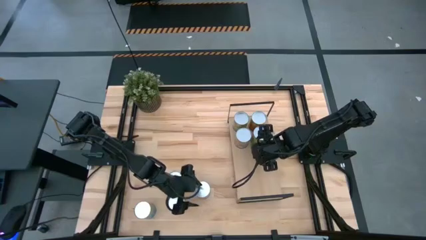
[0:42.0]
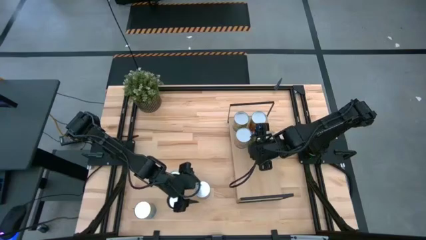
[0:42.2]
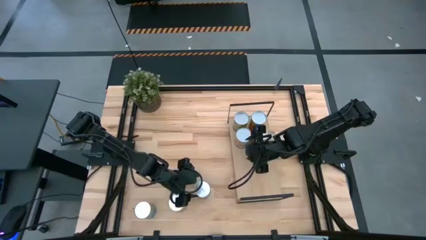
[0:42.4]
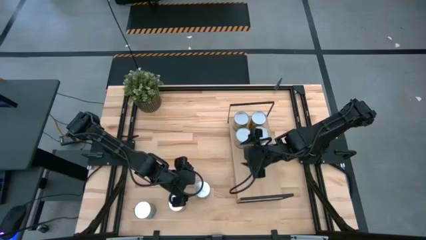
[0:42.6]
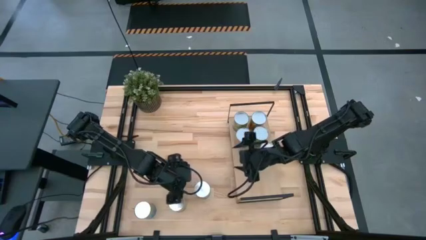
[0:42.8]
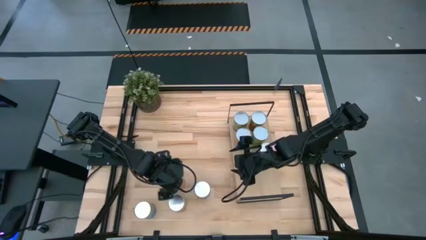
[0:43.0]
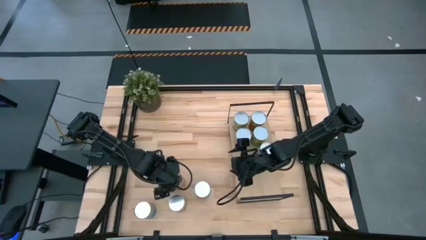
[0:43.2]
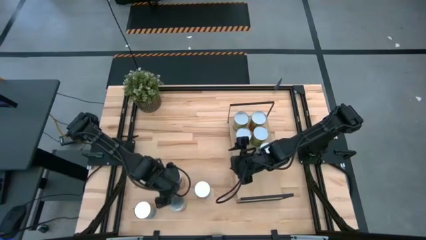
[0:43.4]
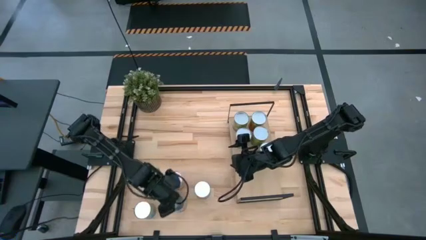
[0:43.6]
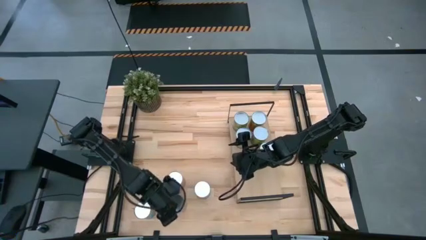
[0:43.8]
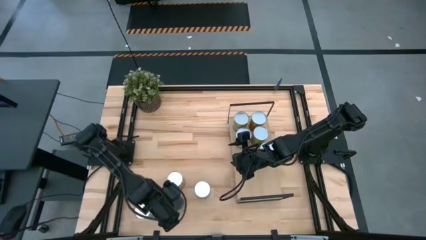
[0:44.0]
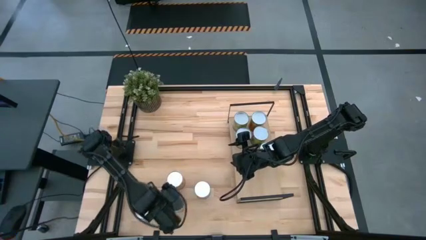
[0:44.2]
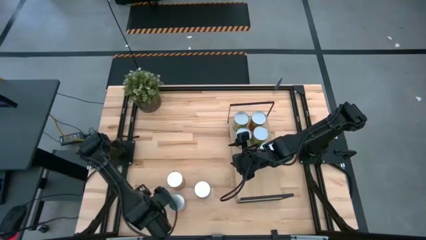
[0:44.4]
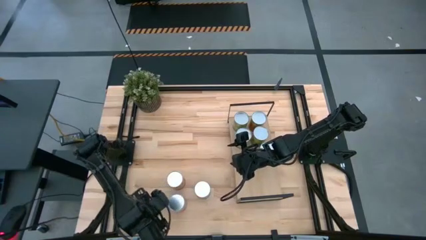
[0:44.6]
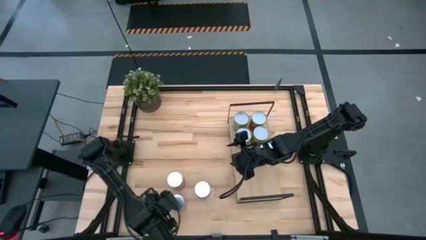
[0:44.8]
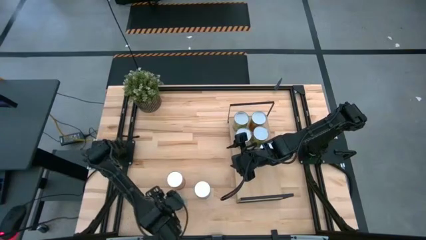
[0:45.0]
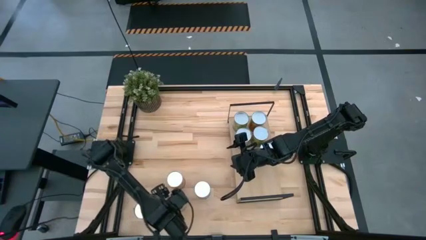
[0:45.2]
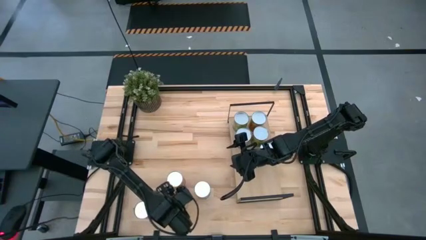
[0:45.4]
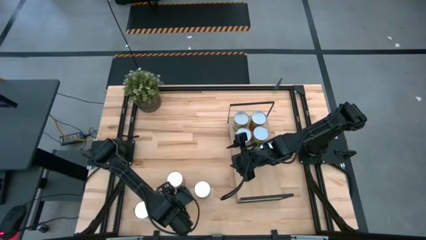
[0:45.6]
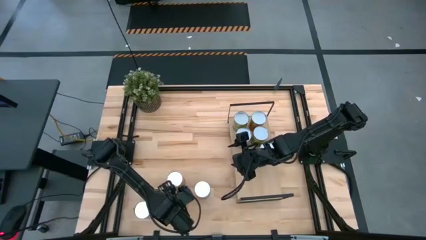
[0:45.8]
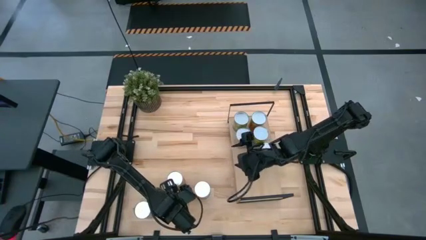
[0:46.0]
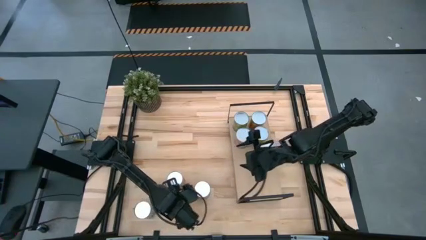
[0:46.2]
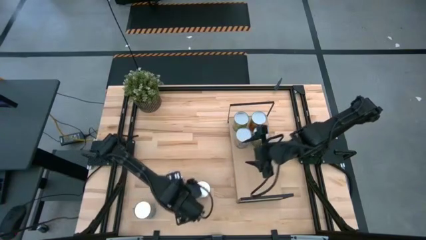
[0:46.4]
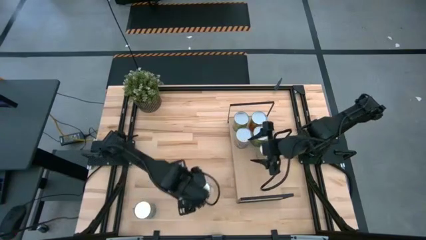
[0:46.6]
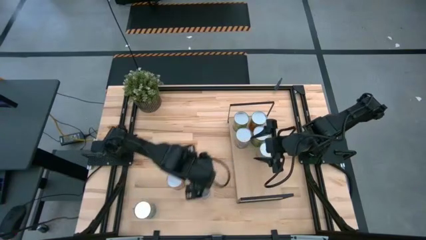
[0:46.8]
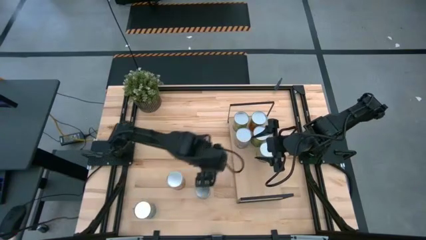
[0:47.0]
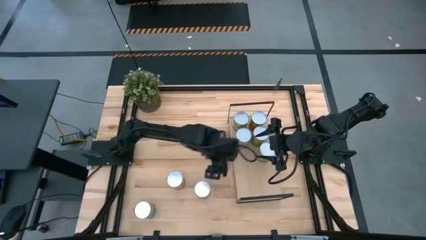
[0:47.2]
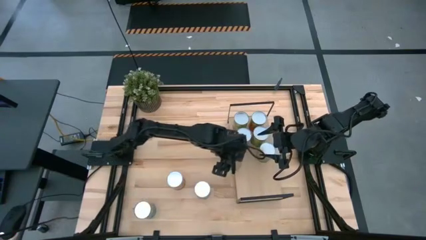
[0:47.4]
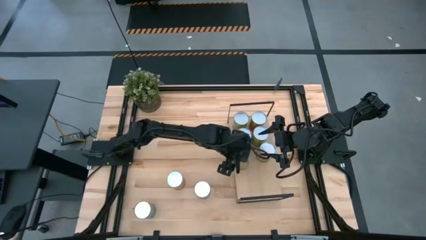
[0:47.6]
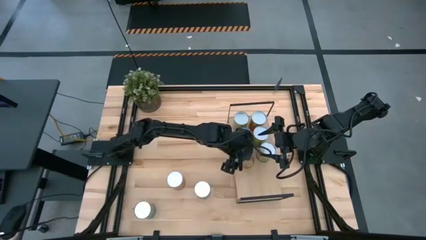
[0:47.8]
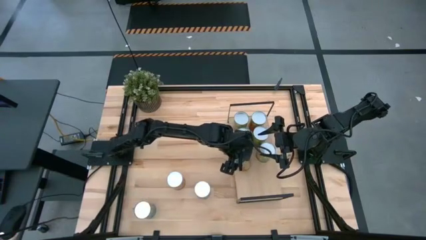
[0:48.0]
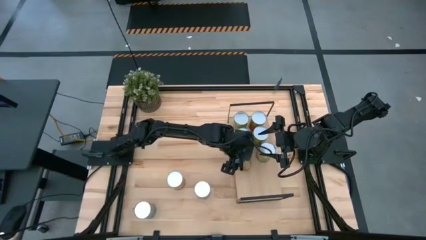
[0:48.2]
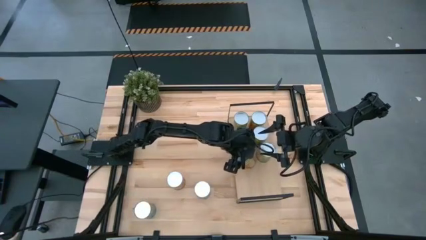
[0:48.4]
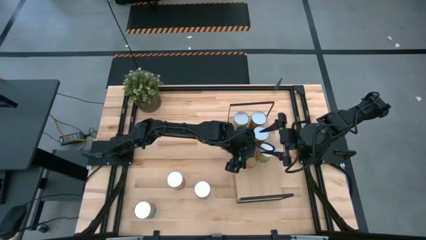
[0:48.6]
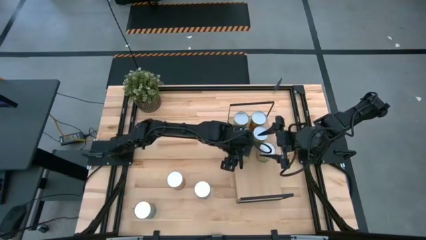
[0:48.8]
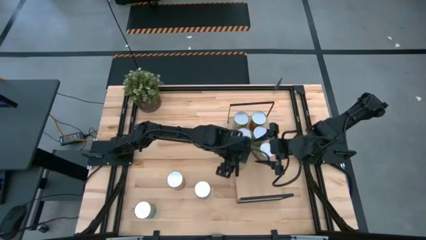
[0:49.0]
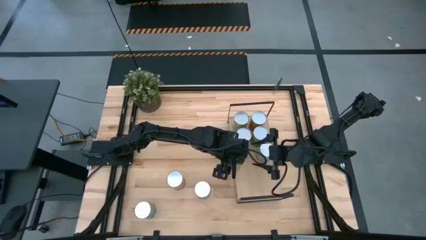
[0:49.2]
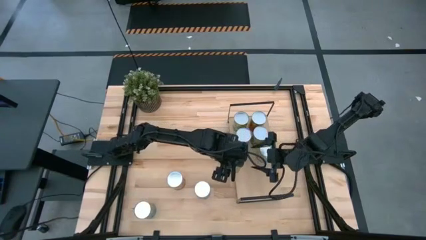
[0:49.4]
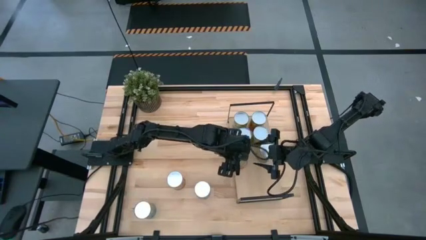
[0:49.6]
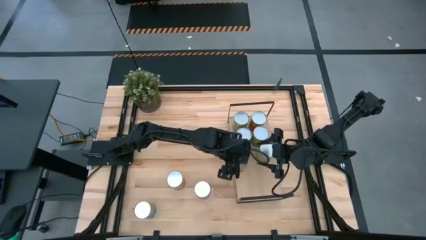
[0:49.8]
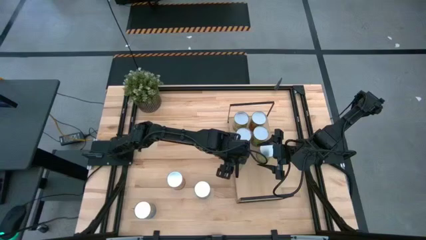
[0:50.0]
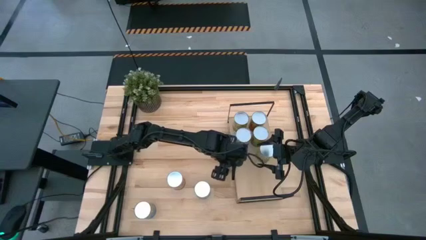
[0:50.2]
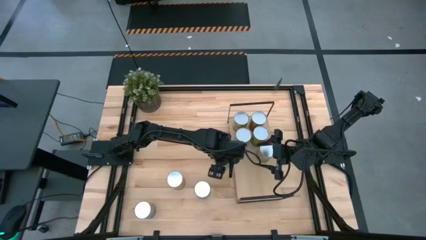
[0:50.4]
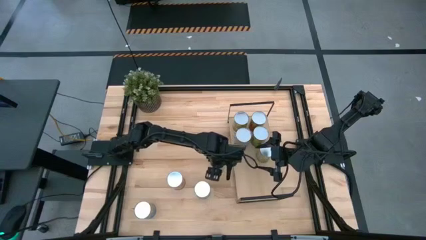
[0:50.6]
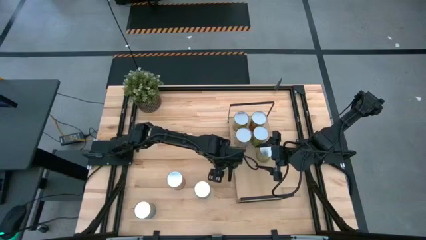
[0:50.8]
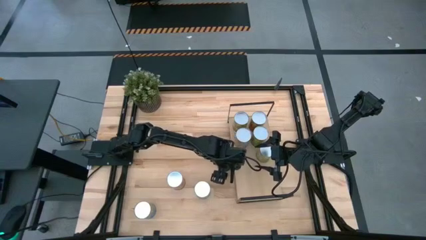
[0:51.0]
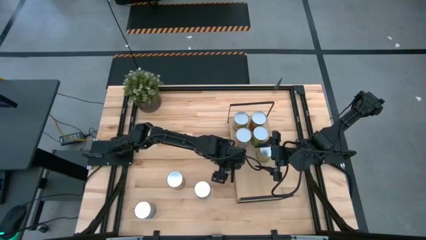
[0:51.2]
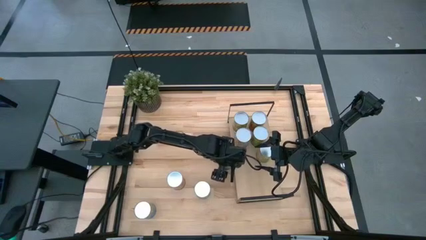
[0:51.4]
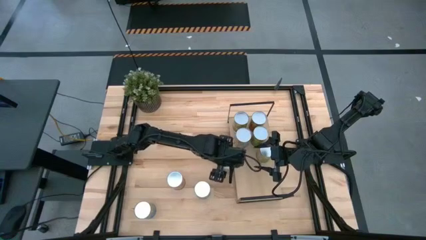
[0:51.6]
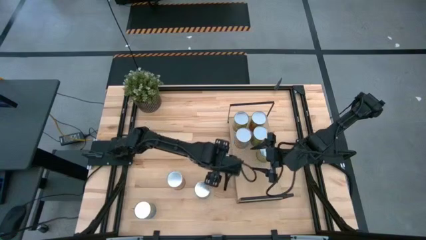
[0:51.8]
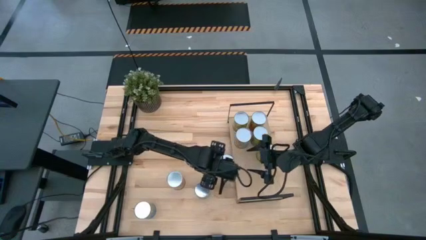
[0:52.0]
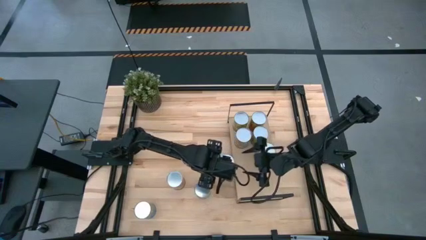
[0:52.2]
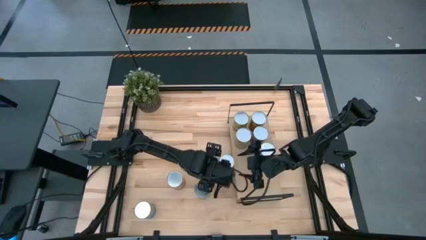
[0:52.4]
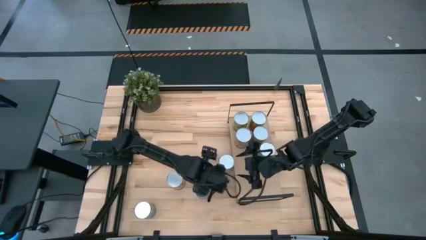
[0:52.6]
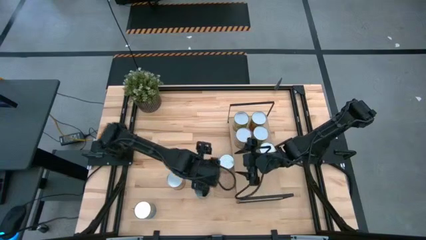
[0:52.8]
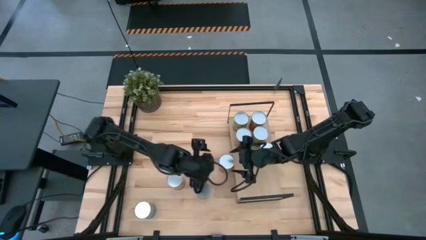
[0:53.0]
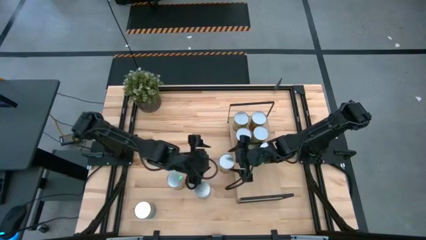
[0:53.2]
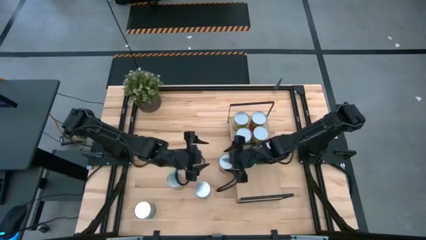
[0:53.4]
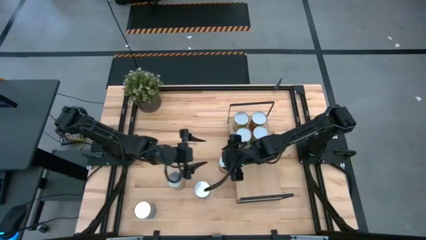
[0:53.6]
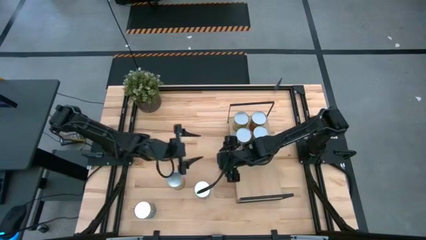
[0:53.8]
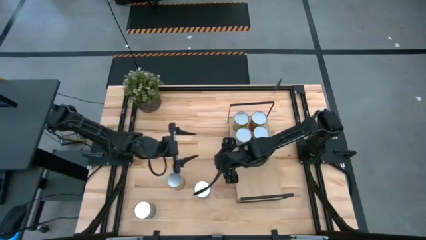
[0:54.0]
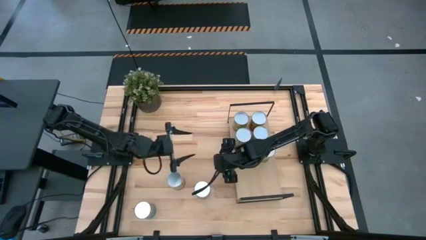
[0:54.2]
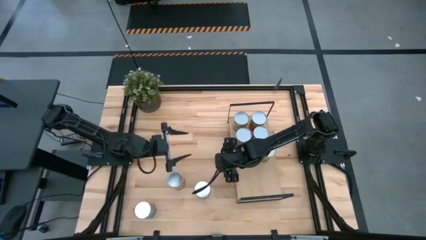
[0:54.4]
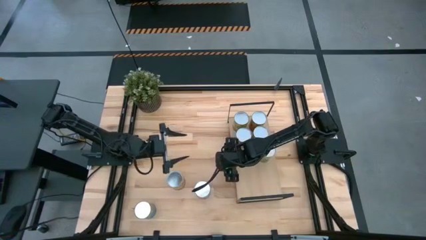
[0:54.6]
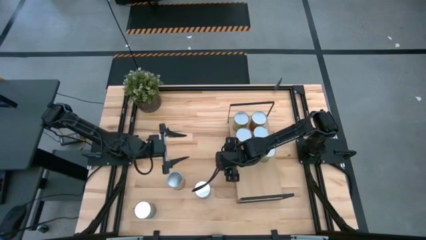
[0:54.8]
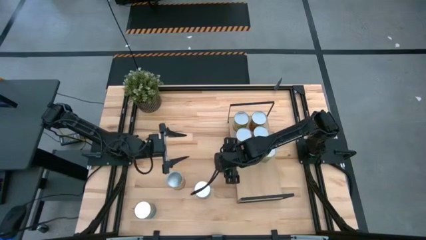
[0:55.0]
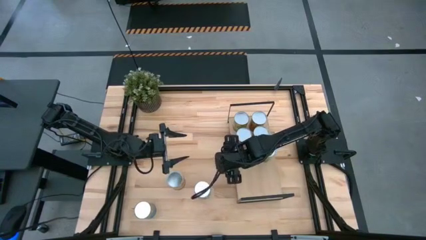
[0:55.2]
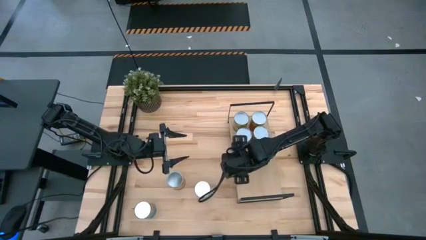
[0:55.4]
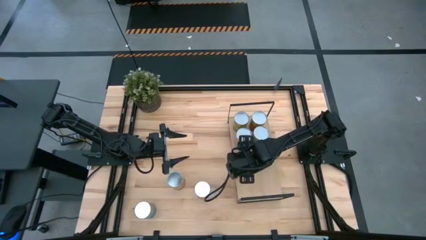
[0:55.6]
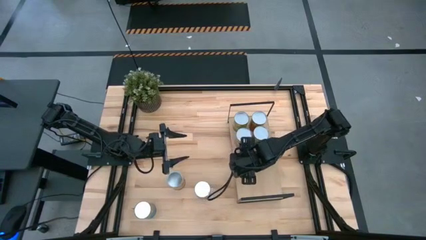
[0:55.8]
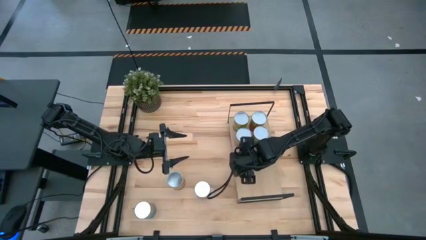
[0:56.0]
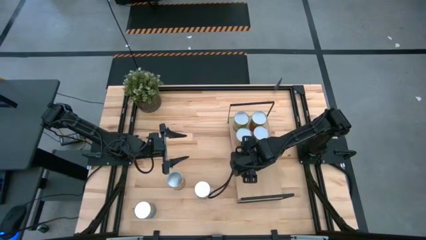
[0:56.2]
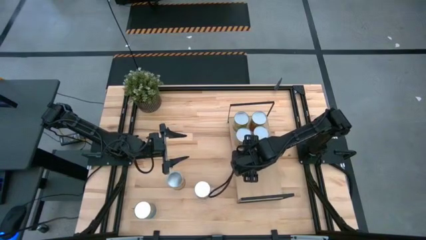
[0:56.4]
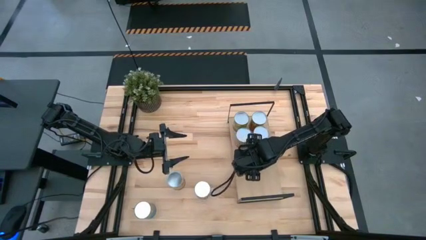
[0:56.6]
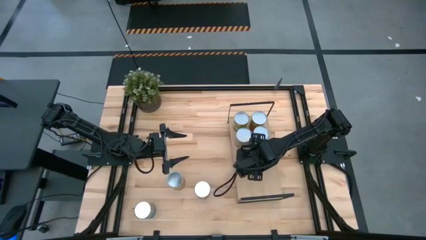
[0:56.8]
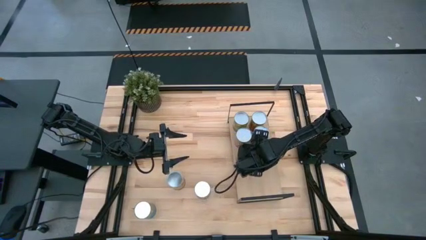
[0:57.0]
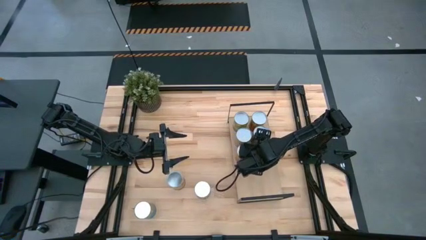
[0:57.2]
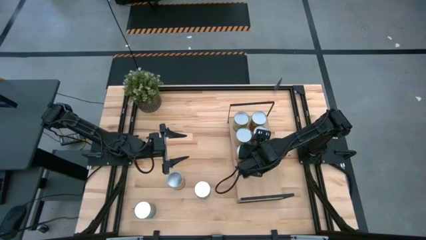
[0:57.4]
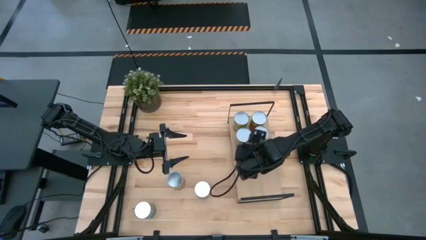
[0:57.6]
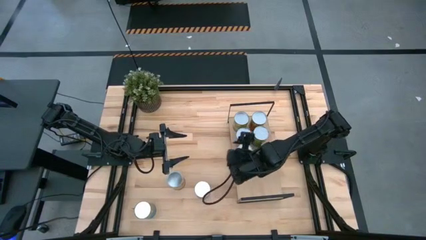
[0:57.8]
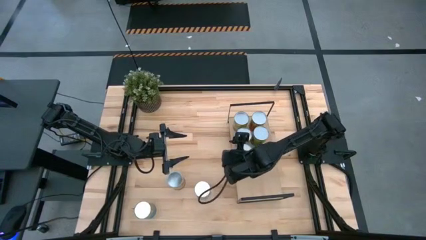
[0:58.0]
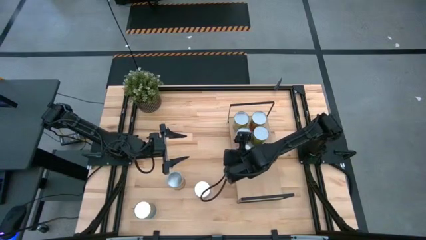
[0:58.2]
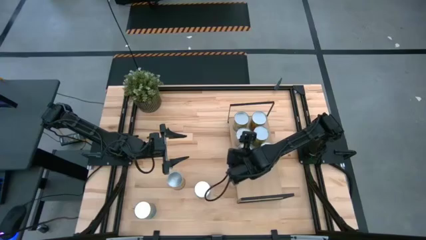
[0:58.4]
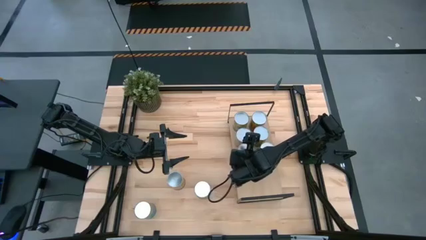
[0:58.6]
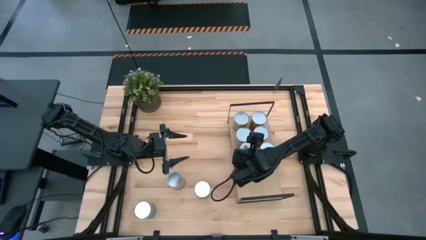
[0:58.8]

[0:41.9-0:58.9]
Task: Pick and place cans onto a shelf
Put the canned pineapple on the shelf
